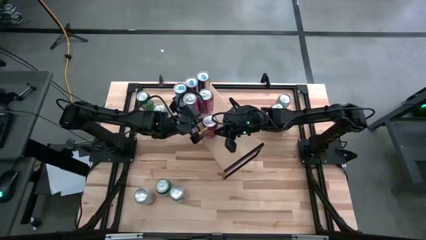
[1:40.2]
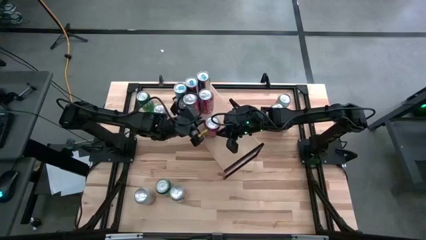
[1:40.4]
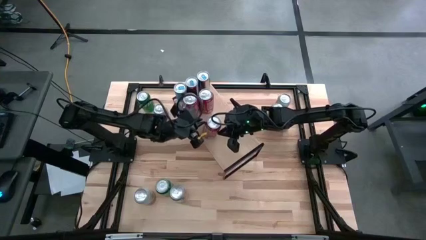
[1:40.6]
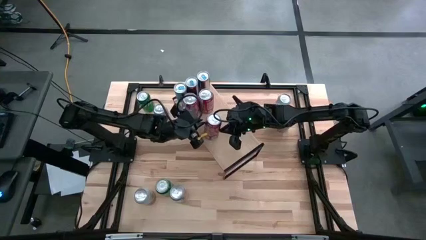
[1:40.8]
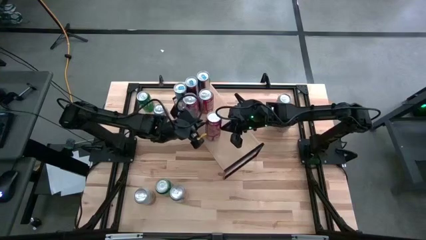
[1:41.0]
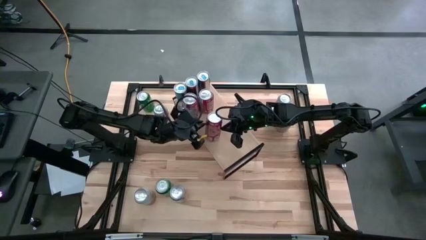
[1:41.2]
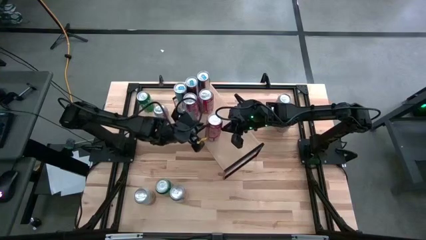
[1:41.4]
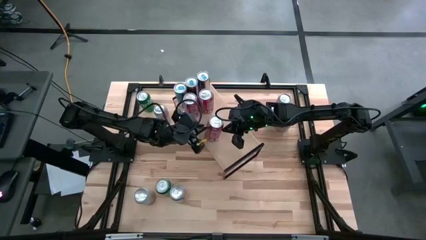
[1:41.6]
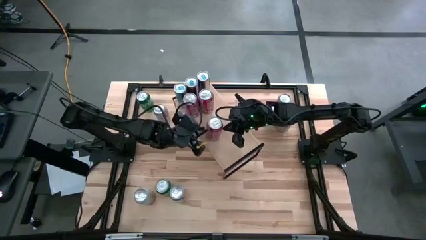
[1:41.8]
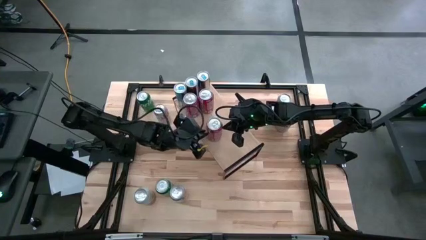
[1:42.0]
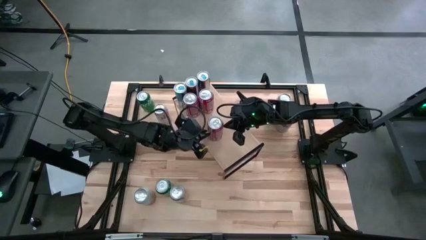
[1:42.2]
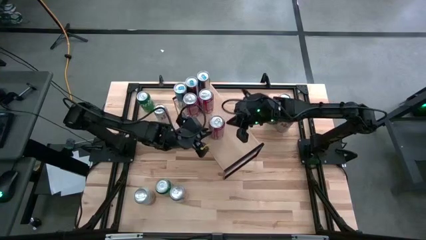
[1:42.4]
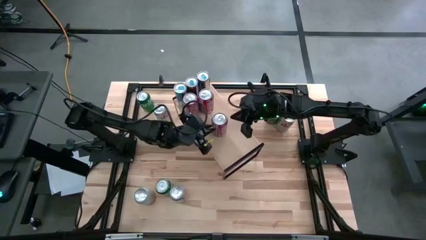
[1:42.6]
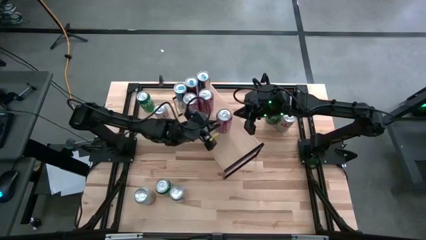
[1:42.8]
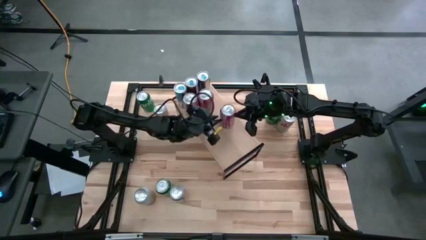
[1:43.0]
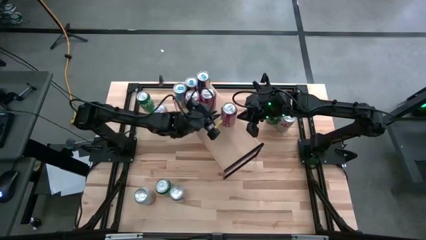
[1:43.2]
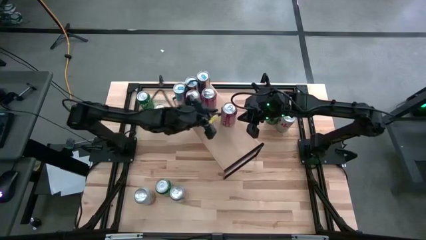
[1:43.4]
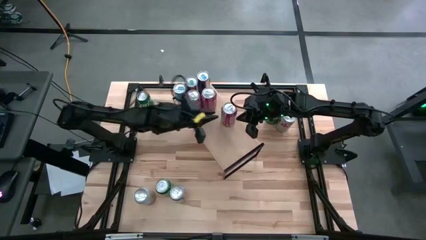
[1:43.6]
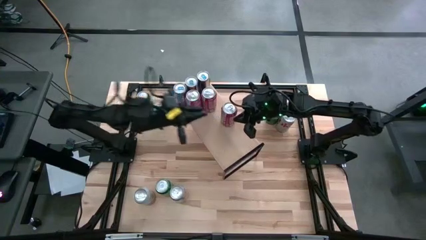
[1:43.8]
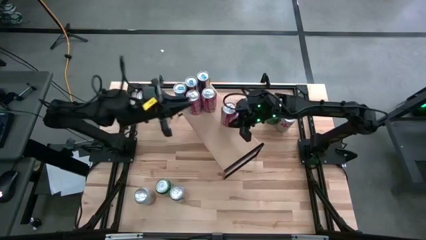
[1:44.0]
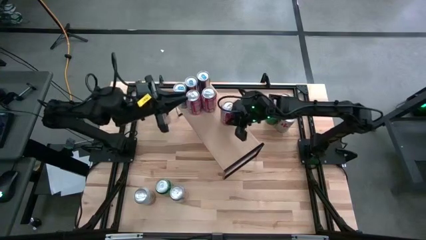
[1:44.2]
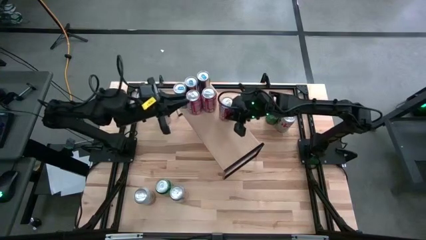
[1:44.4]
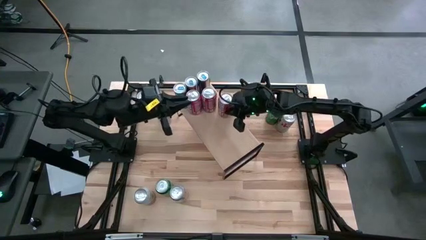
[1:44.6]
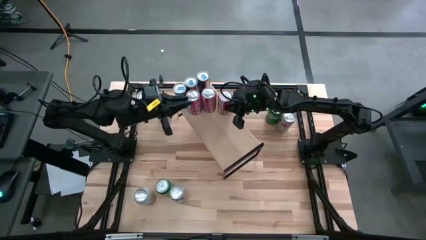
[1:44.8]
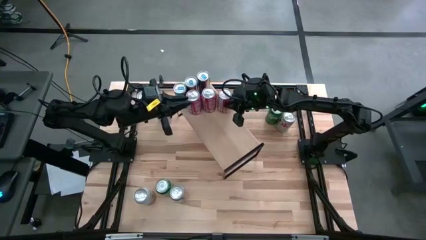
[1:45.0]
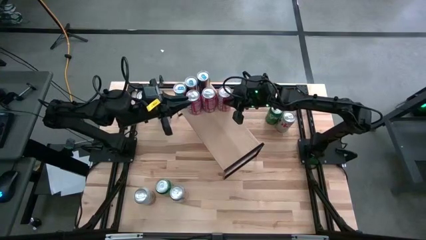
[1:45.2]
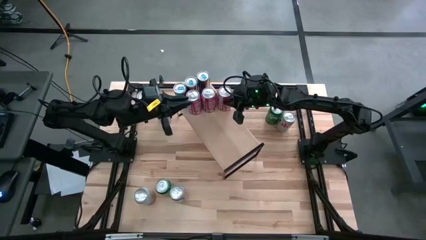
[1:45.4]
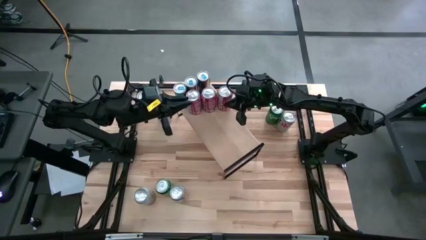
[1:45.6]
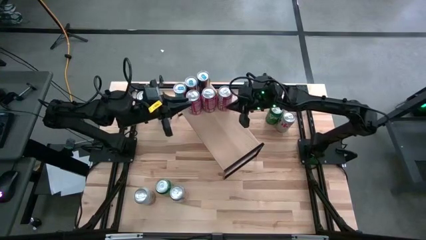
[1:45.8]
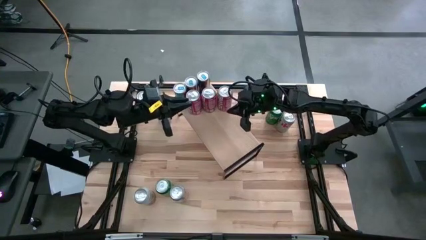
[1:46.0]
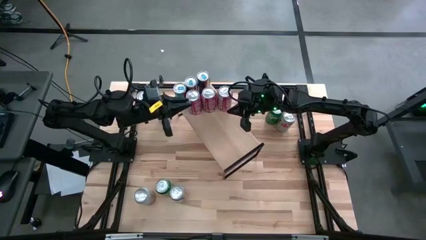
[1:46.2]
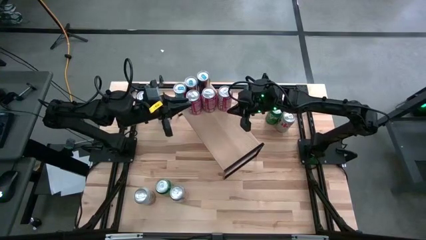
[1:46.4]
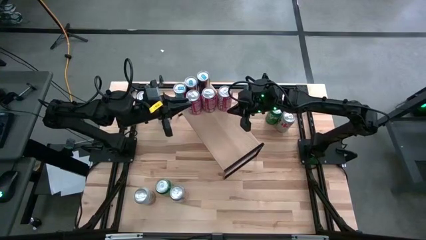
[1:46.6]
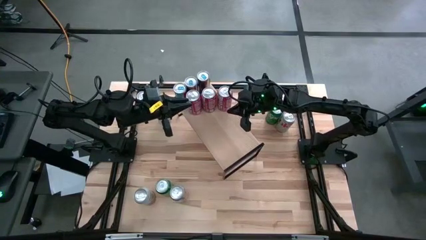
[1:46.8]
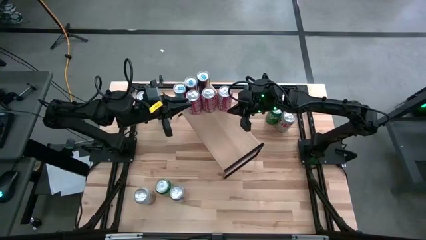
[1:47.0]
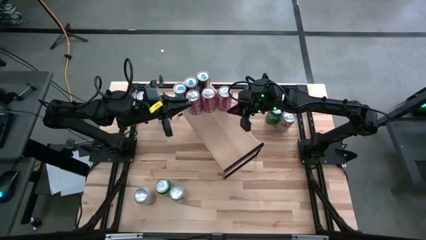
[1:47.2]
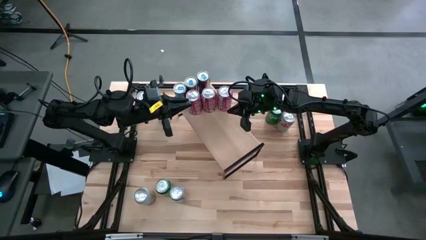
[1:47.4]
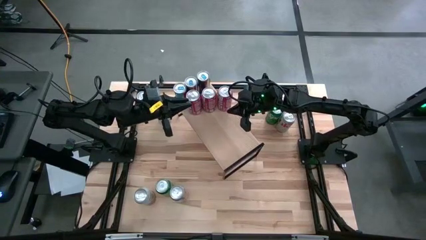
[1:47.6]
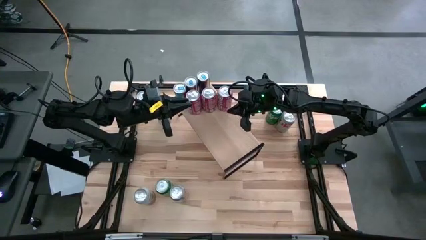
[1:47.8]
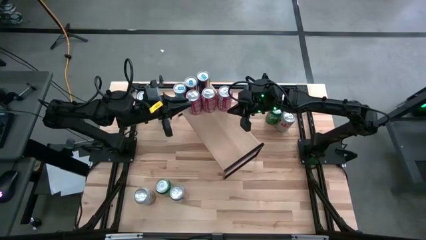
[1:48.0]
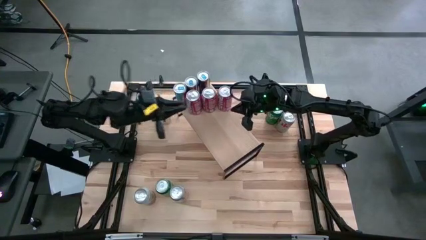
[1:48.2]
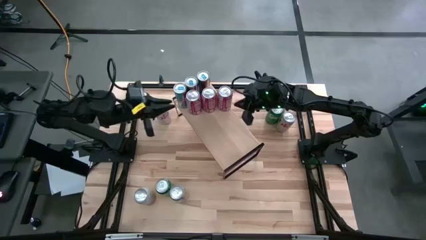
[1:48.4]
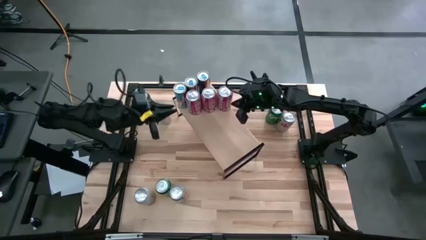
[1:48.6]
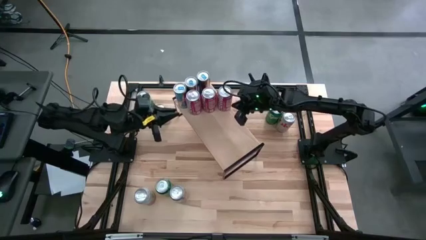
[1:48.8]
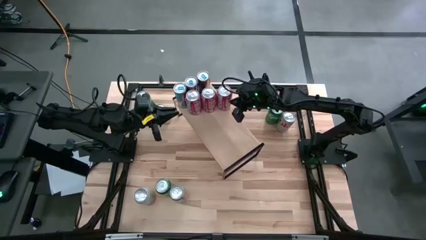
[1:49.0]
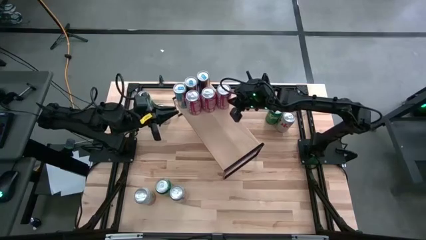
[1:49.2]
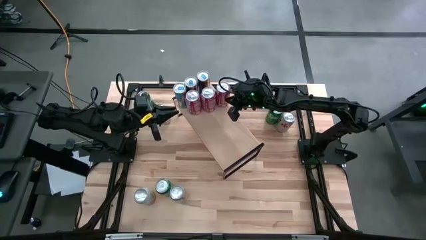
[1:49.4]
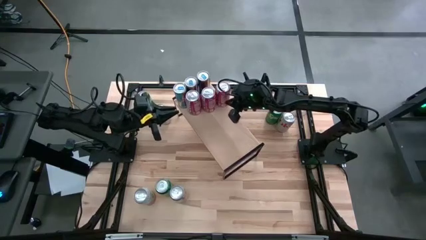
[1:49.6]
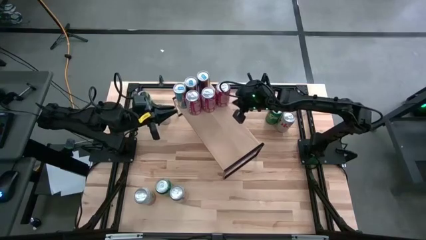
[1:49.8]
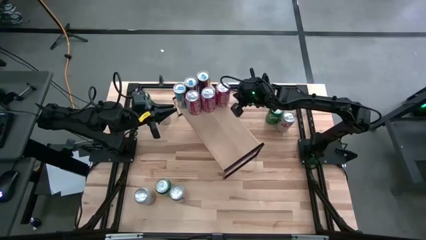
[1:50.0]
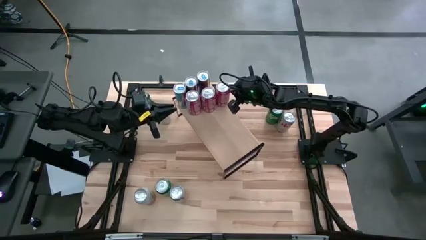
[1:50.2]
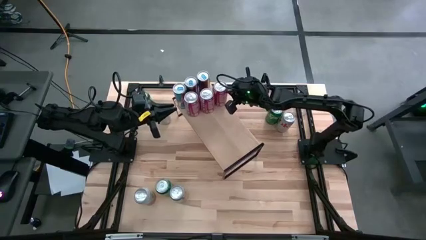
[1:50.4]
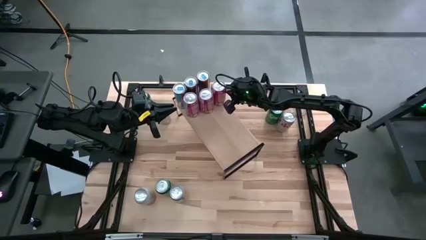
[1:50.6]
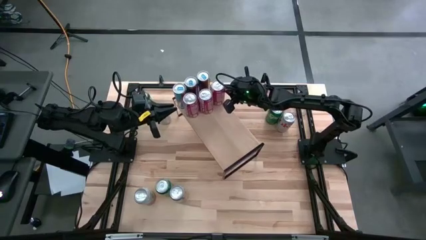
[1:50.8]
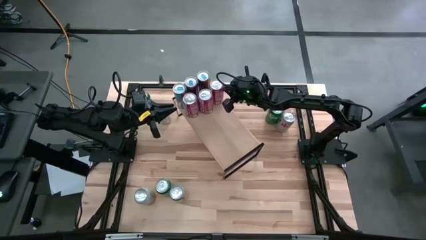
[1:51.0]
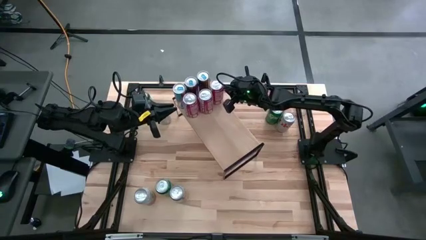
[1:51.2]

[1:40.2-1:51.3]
Task: Place canned beverage on shelf
Put the red soda can on the shelf aligned with the other red soda cans

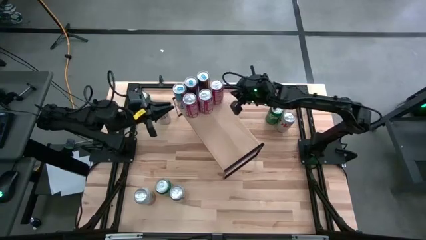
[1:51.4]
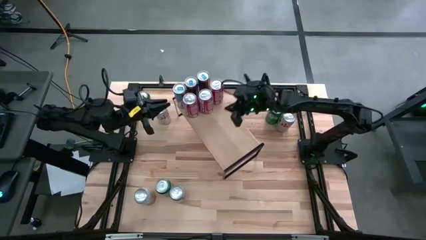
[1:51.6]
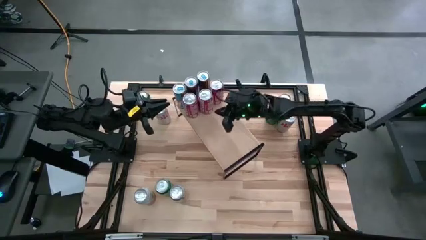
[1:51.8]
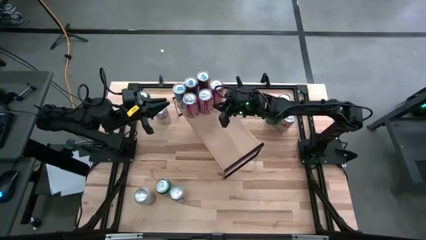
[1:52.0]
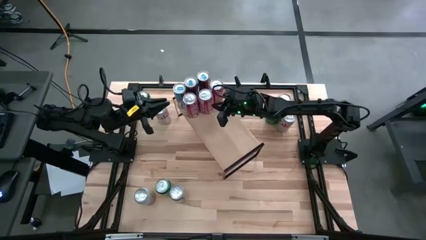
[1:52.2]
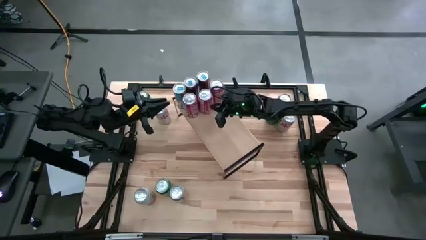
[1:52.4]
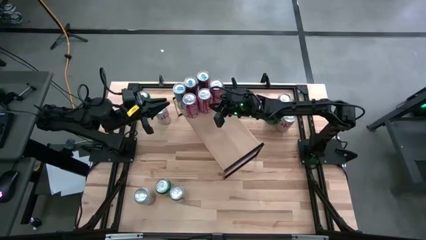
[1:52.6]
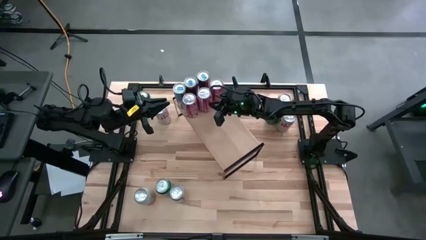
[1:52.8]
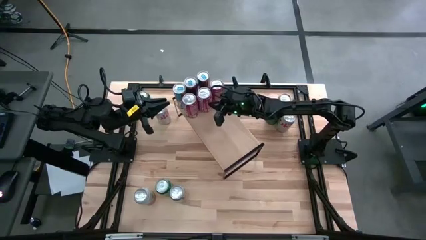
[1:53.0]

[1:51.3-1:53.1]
Adjust the red soda can on the shelf
